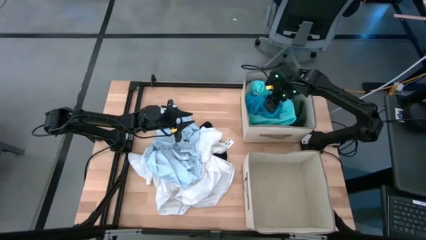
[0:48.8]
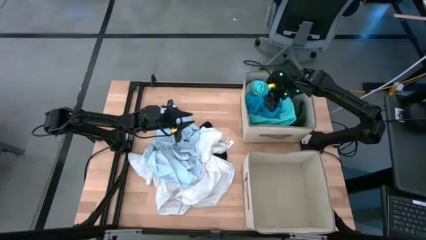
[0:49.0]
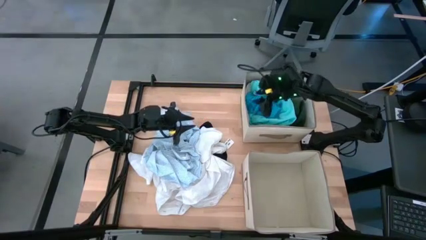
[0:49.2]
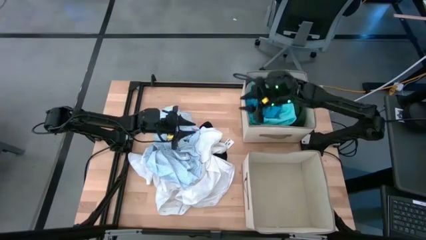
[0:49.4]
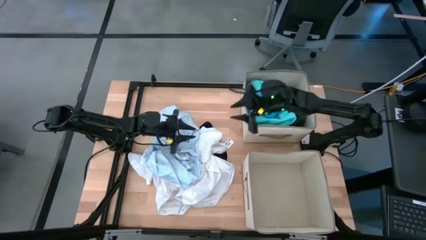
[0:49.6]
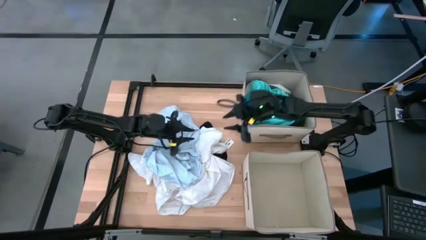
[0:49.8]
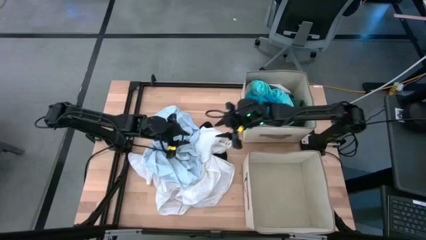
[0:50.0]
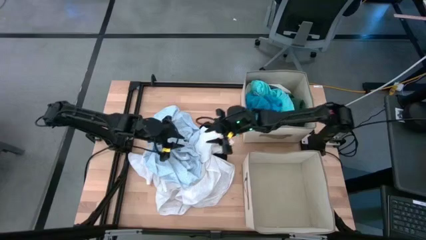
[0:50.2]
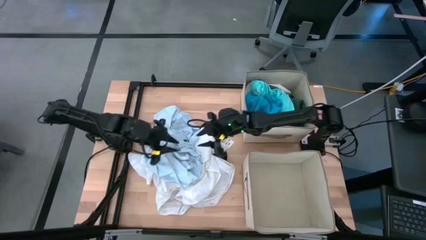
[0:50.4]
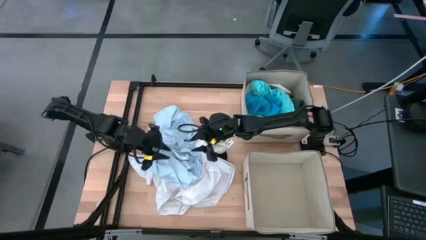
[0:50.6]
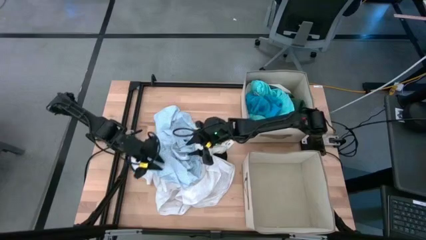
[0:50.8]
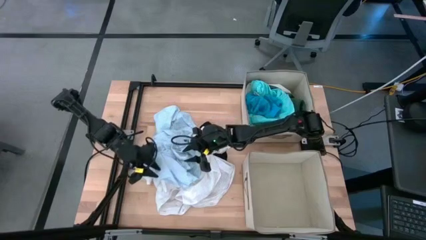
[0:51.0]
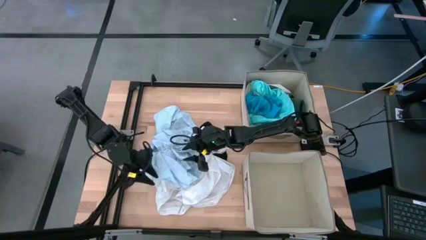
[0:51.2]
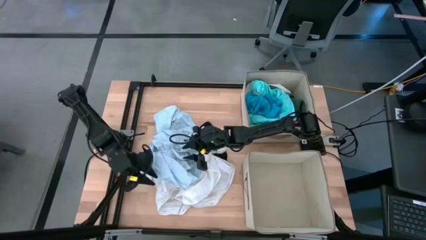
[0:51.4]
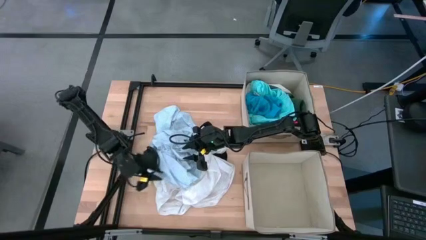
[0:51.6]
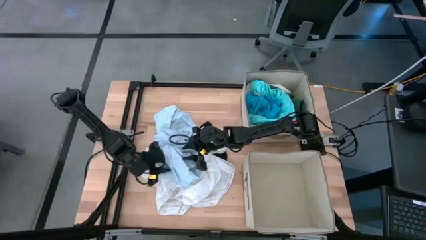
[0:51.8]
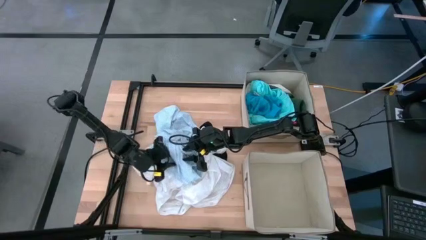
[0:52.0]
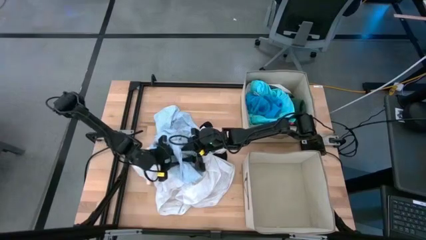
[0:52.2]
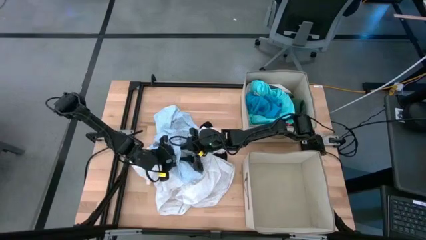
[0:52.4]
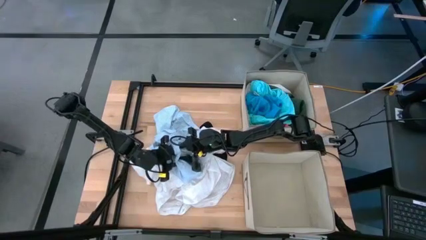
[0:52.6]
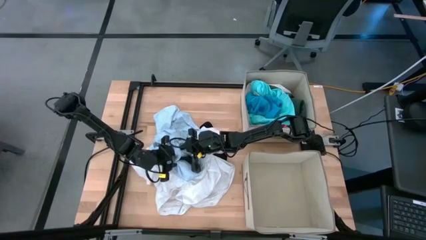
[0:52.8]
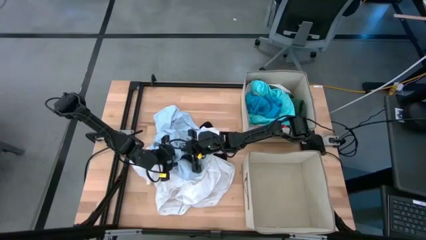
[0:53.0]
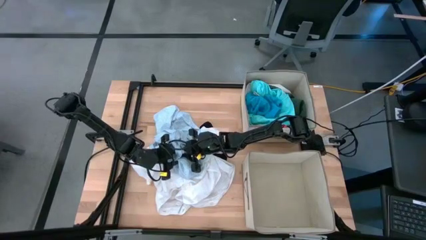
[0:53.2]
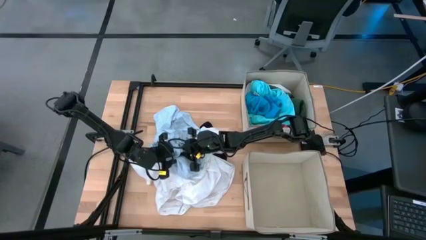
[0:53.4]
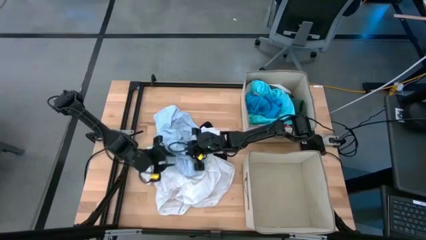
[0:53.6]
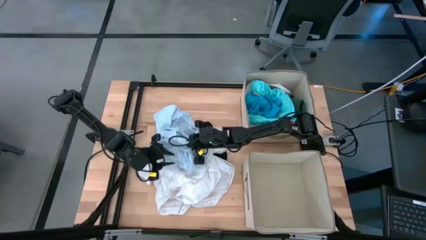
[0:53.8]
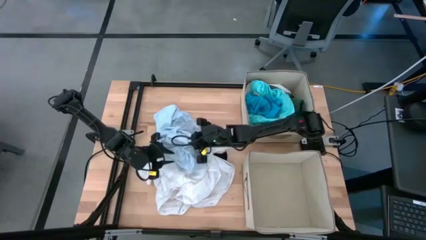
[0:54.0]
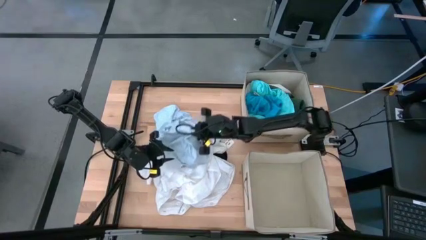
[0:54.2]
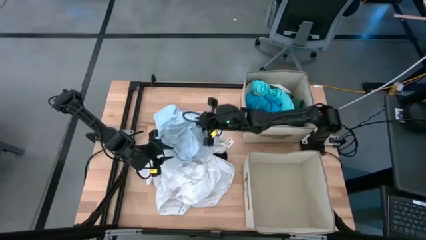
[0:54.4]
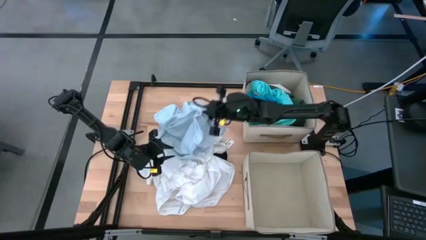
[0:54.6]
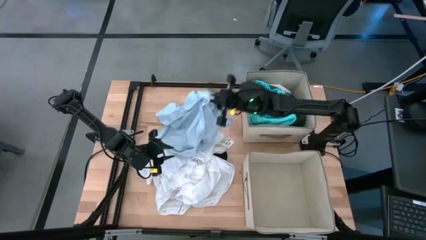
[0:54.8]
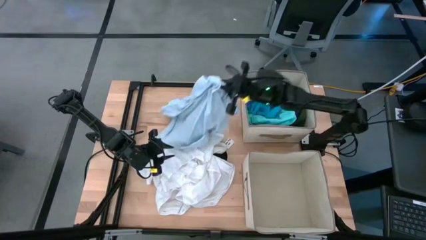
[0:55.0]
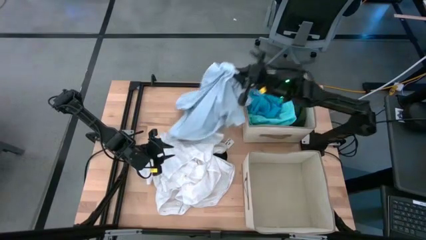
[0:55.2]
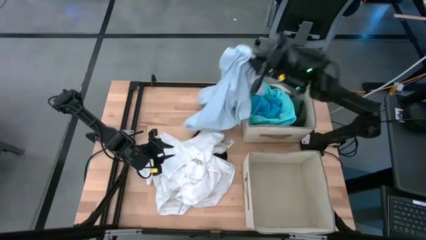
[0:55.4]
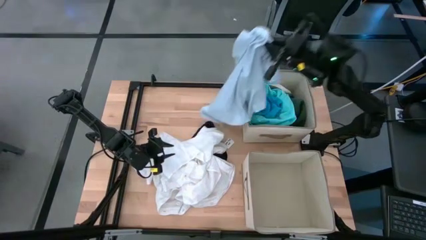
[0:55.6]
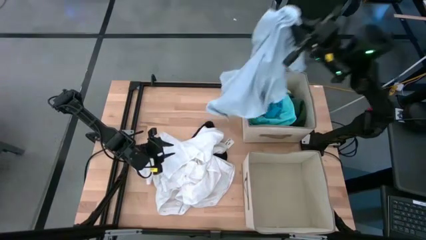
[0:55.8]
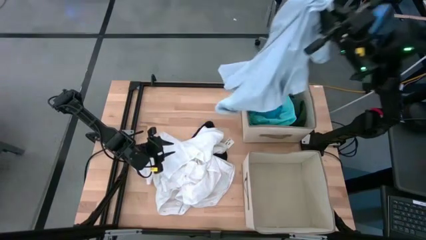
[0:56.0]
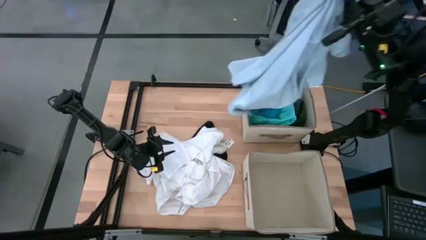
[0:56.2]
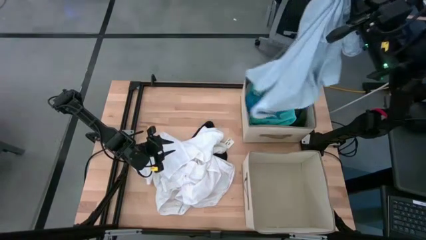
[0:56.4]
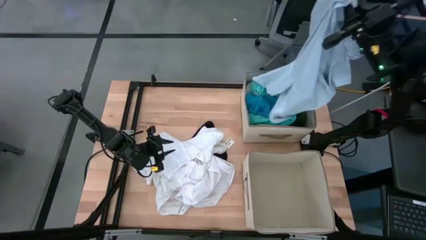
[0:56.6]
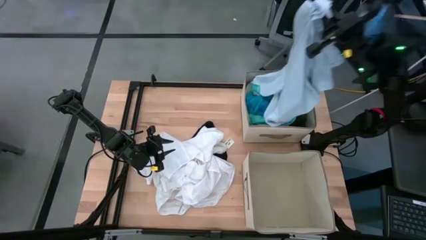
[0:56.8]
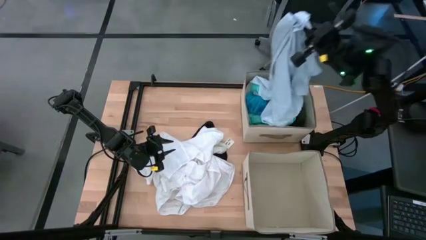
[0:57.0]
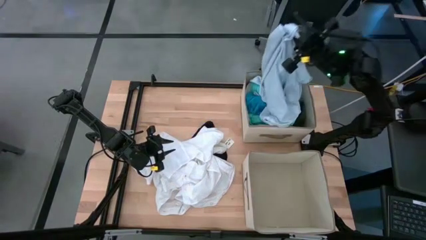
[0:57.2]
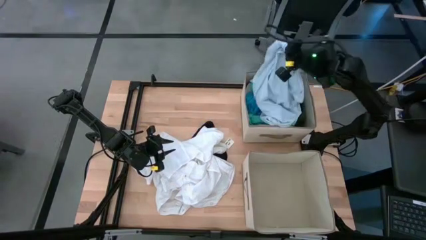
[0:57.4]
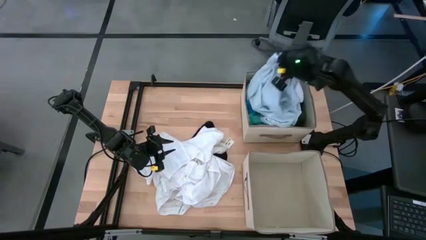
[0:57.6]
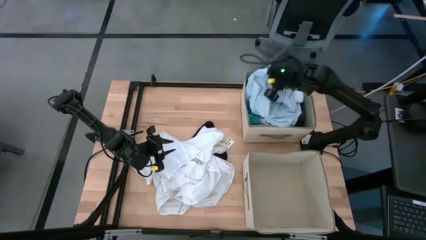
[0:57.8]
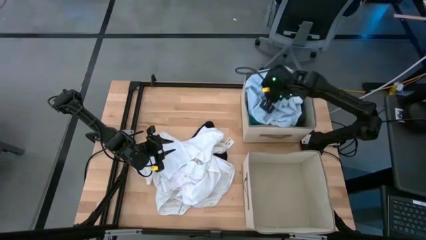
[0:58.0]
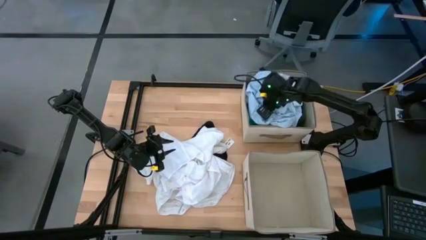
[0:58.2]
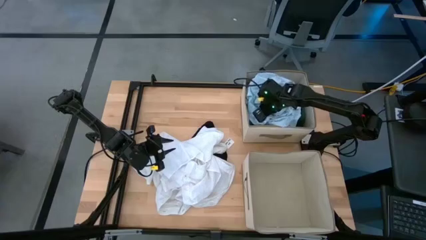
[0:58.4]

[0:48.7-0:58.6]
Task: Sort clothes
Put the patterned polo into the top bin

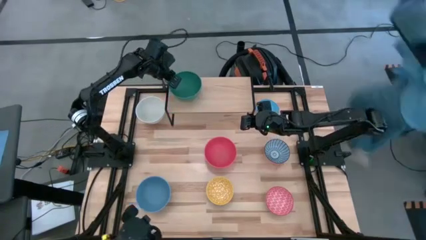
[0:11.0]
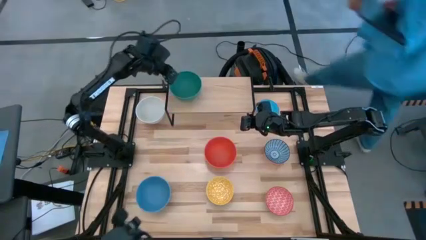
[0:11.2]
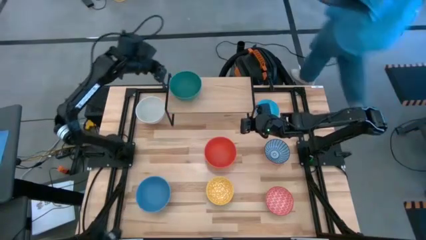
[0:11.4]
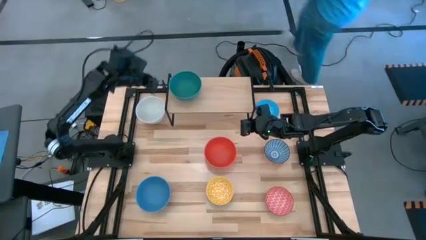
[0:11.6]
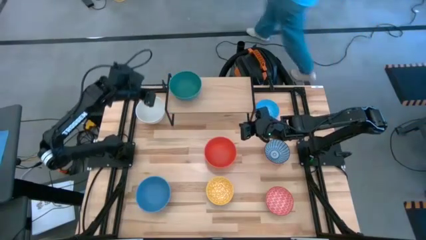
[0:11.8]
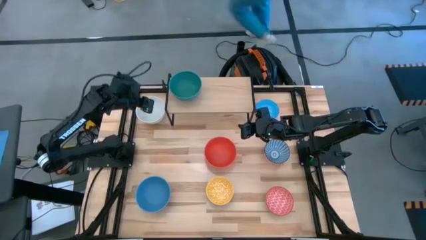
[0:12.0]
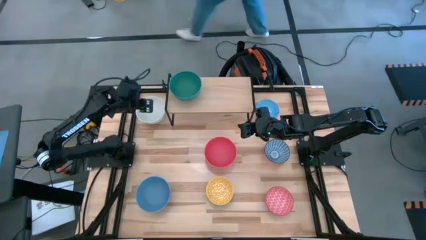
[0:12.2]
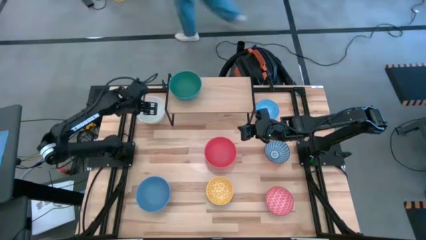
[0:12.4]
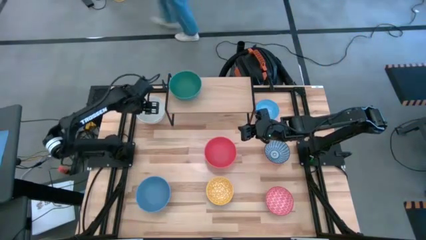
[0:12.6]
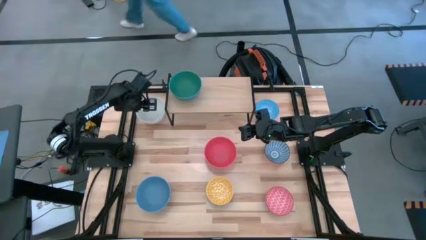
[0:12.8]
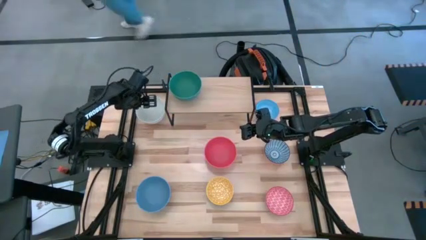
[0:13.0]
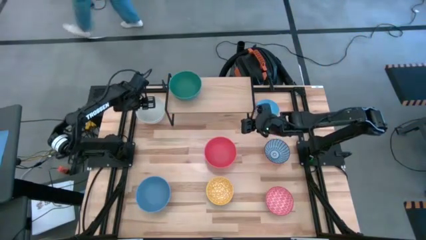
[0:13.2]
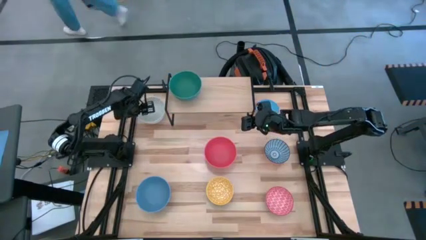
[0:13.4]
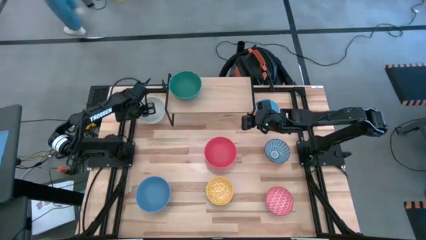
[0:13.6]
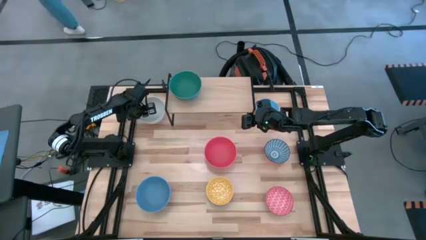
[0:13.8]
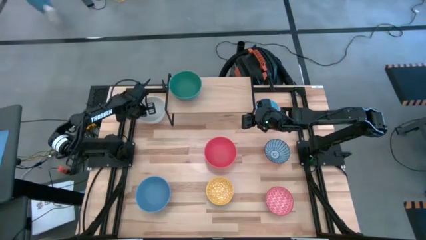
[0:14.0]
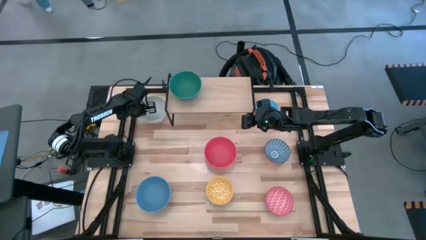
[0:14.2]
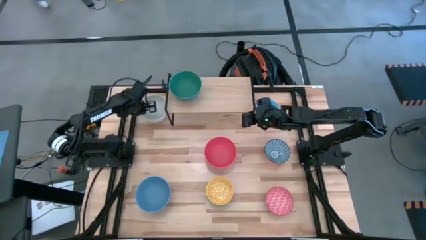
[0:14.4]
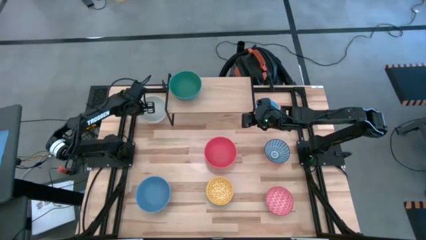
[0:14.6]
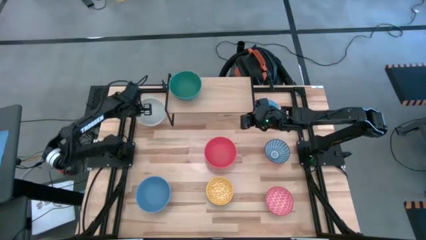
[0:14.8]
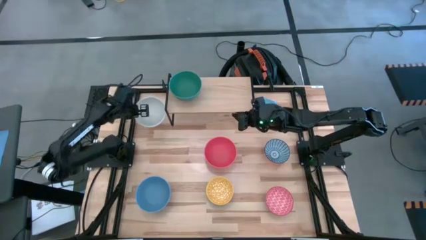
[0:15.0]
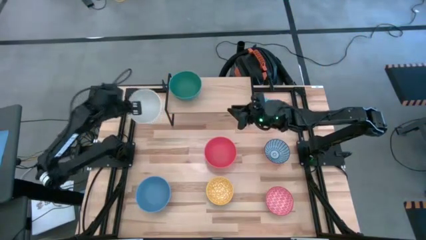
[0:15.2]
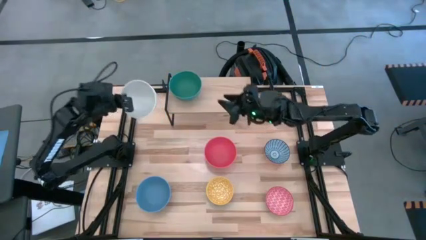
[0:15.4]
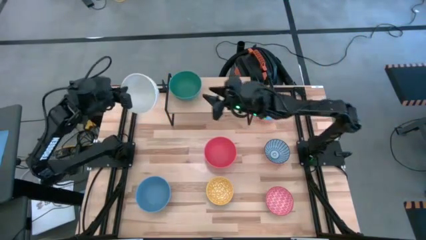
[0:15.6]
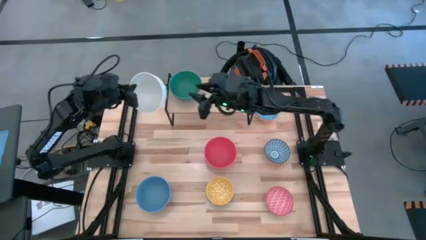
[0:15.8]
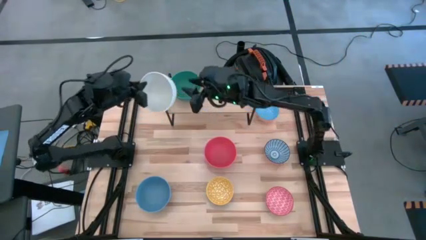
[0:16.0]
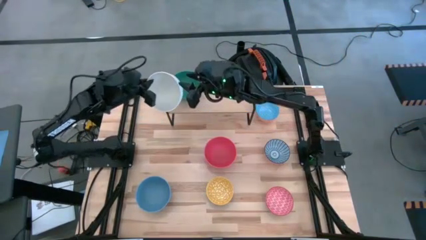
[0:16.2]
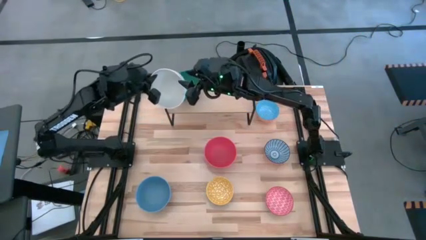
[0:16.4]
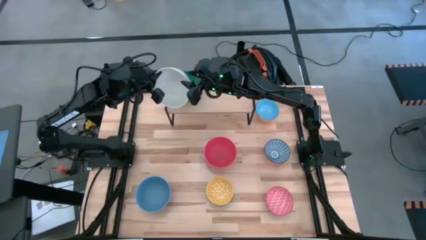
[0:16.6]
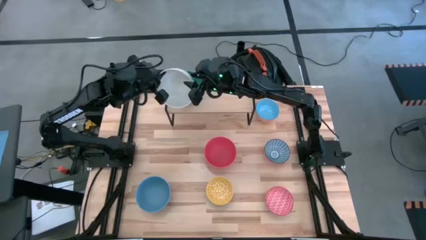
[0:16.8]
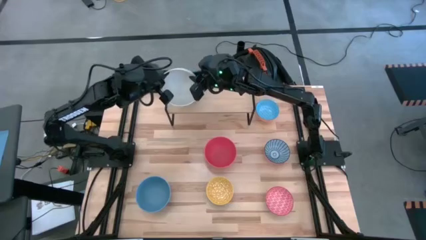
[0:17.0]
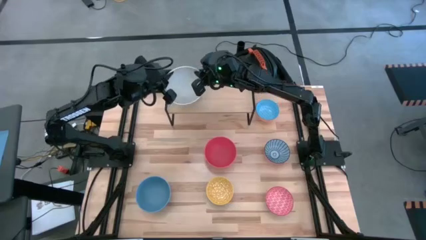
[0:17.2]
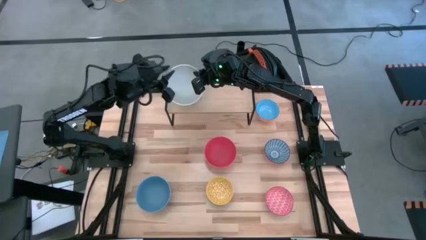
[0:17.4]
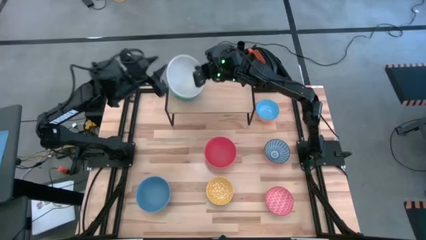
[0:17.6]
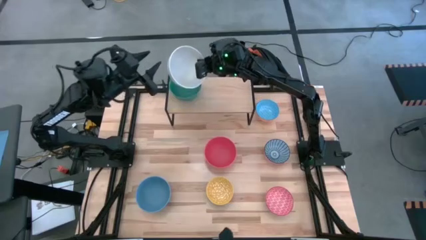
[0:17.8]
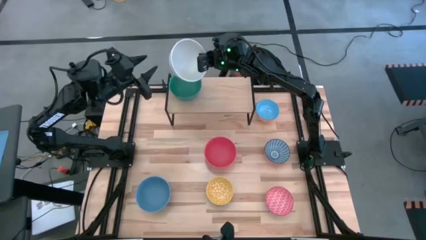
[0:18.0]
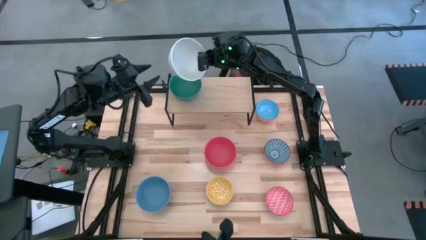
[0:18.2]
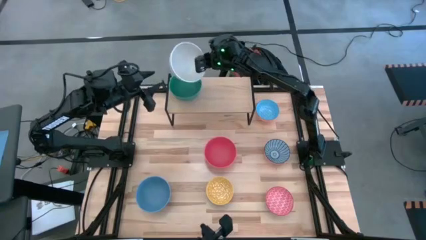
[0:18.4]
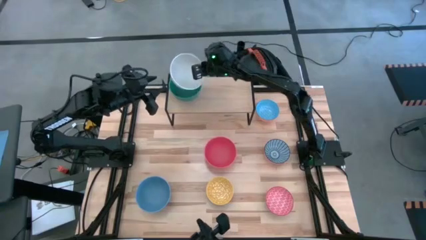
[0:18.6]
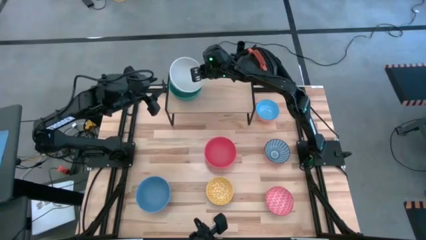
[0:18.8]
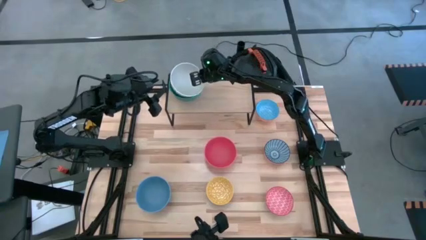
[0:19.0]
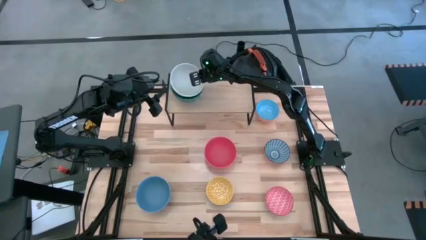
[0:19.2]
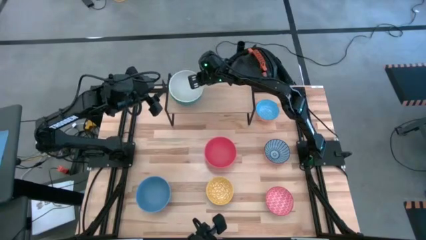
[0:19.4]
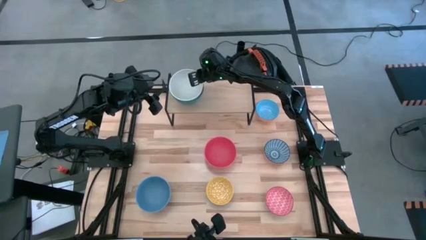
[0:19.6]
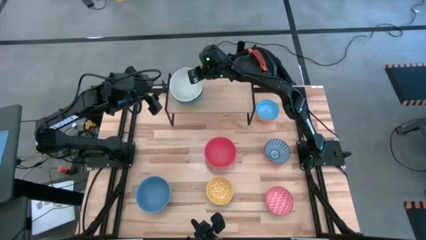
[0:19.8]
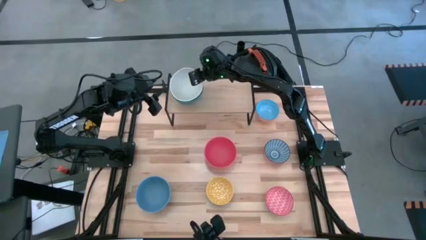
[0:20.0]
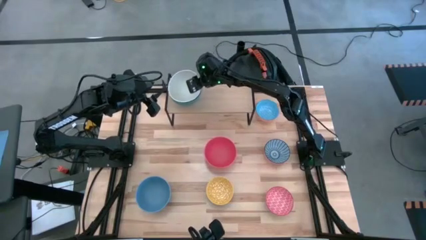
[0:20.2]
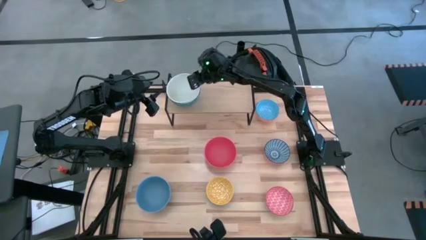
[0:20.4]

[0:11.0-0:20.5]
Task: Place and stack bowls onto a shelf
Stack the white bowl into the green bowl
